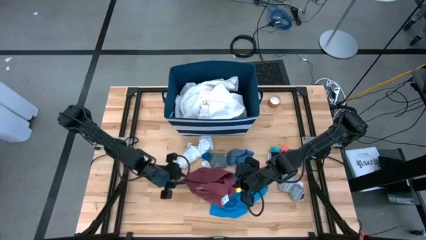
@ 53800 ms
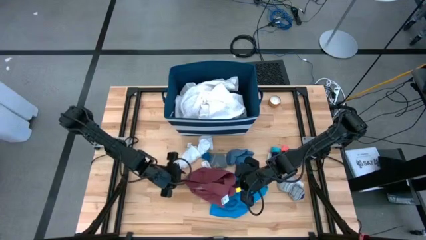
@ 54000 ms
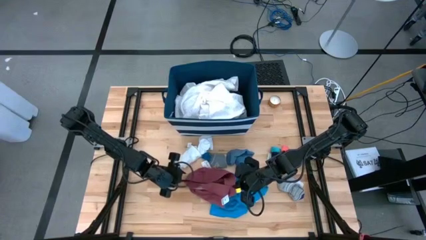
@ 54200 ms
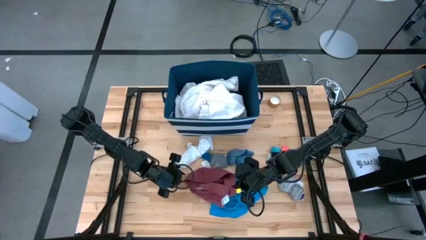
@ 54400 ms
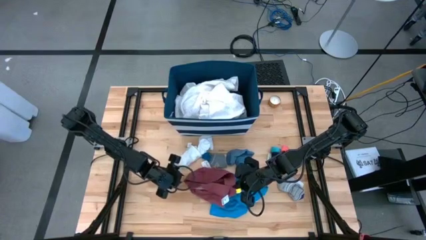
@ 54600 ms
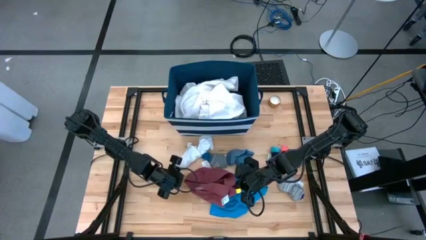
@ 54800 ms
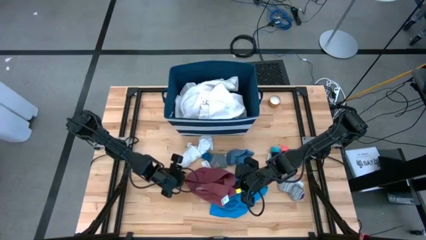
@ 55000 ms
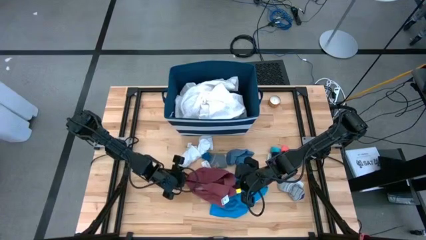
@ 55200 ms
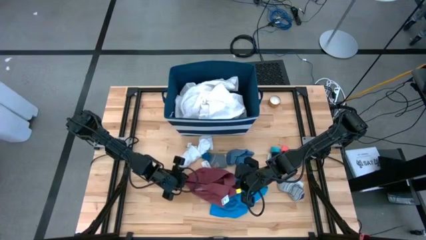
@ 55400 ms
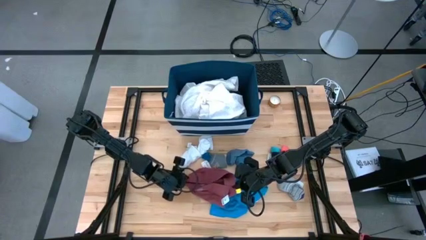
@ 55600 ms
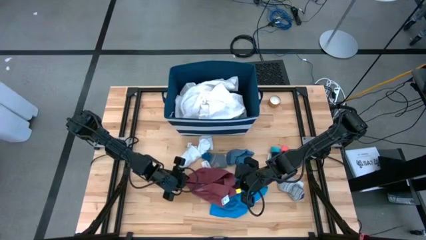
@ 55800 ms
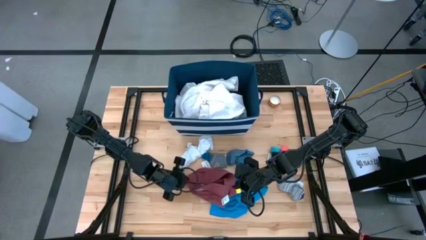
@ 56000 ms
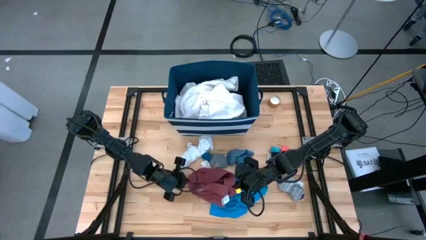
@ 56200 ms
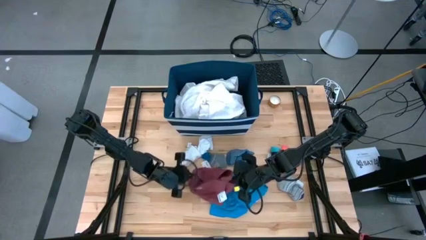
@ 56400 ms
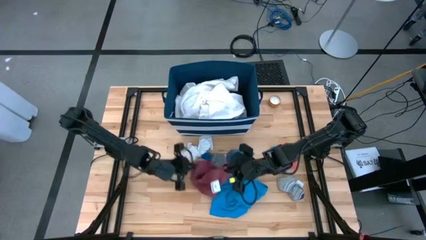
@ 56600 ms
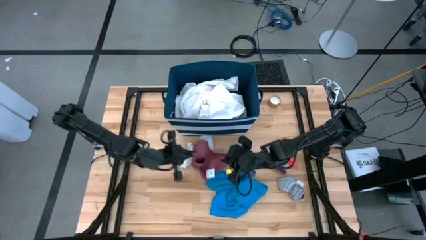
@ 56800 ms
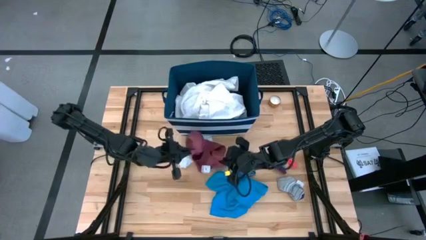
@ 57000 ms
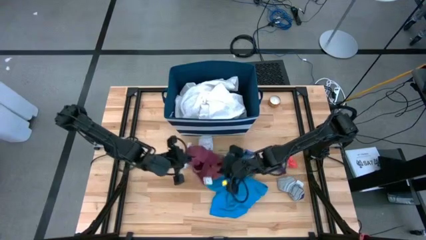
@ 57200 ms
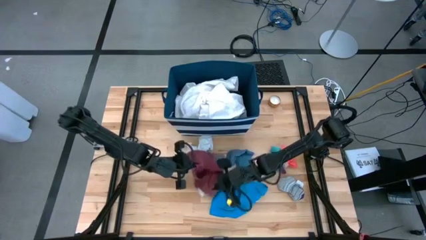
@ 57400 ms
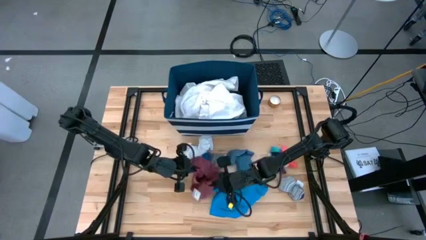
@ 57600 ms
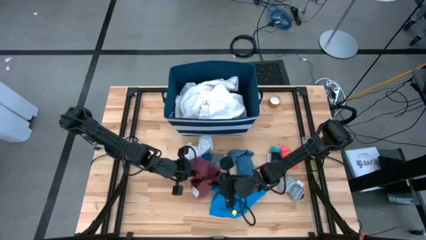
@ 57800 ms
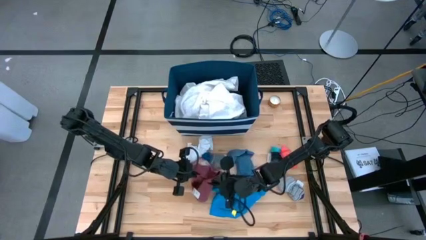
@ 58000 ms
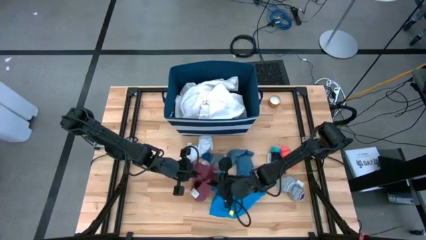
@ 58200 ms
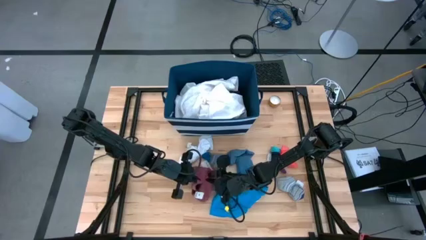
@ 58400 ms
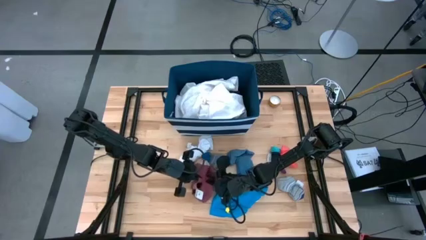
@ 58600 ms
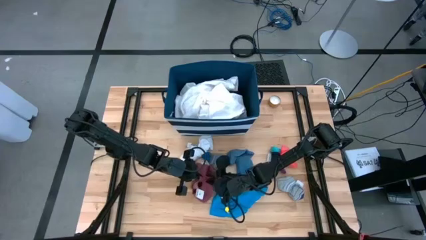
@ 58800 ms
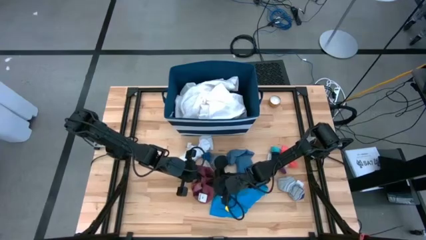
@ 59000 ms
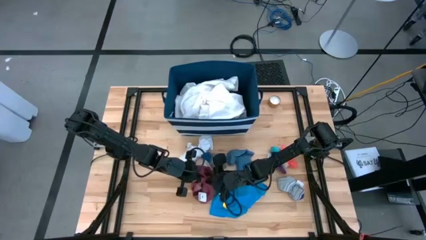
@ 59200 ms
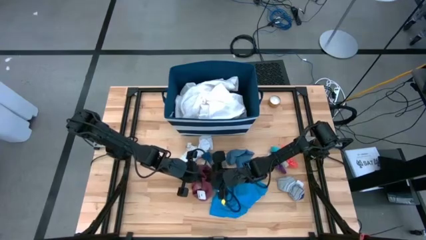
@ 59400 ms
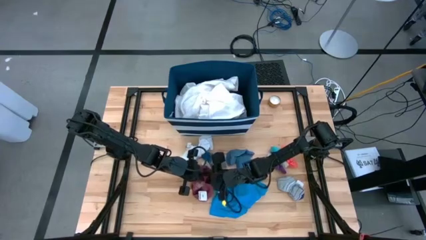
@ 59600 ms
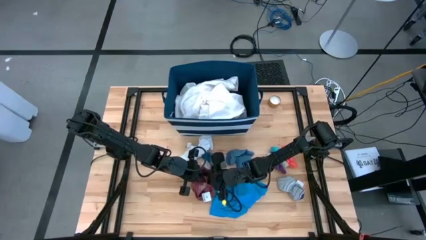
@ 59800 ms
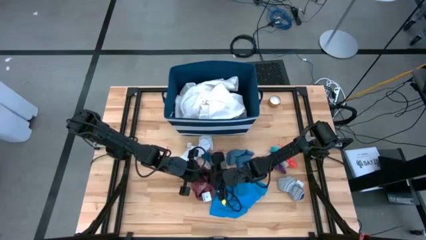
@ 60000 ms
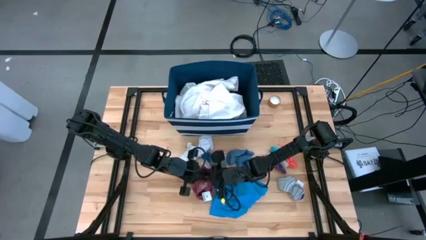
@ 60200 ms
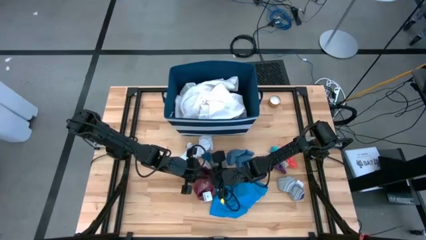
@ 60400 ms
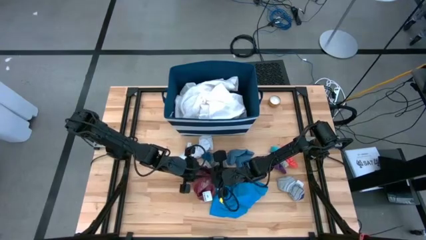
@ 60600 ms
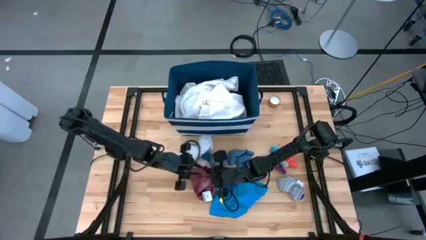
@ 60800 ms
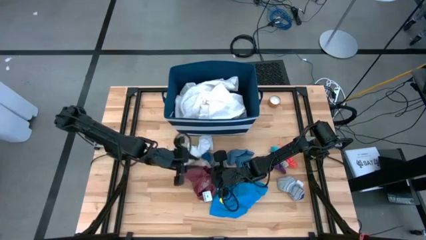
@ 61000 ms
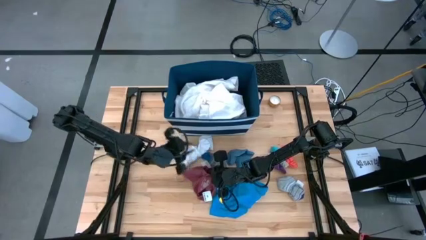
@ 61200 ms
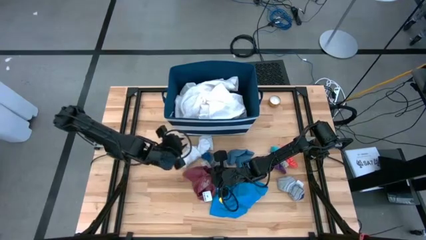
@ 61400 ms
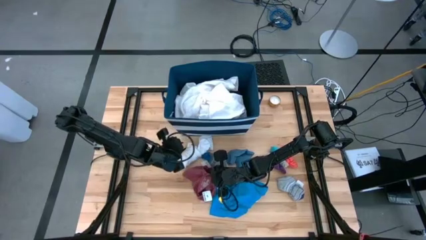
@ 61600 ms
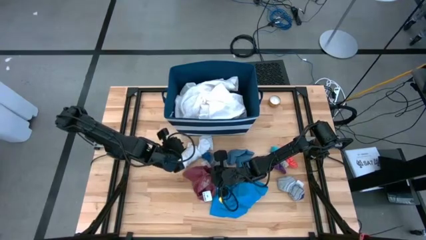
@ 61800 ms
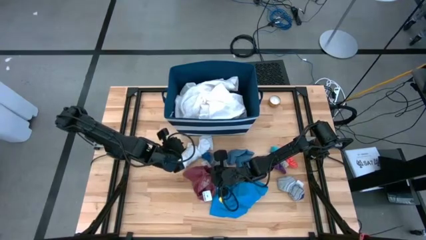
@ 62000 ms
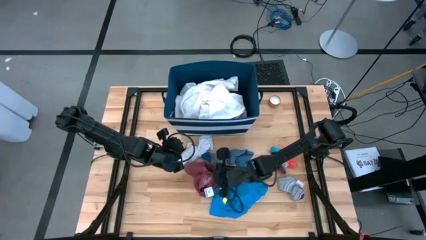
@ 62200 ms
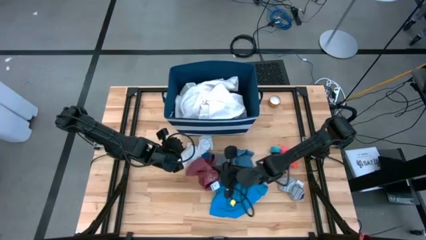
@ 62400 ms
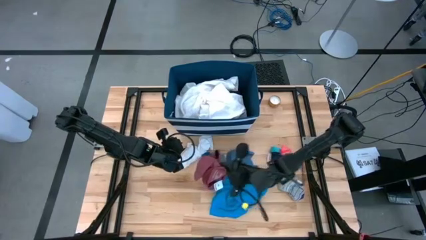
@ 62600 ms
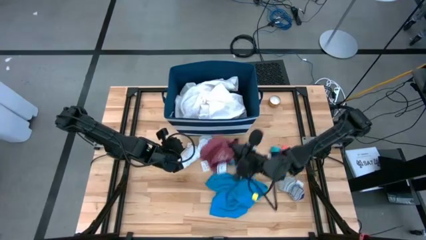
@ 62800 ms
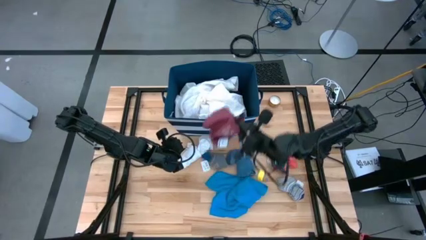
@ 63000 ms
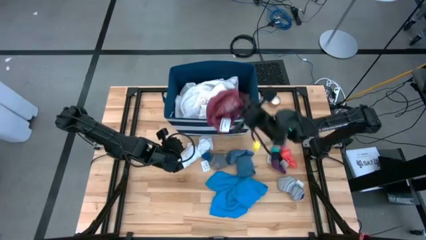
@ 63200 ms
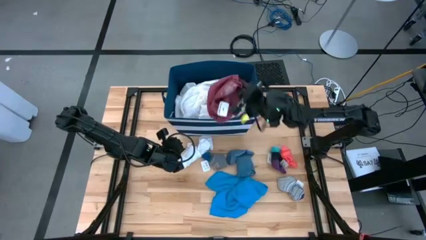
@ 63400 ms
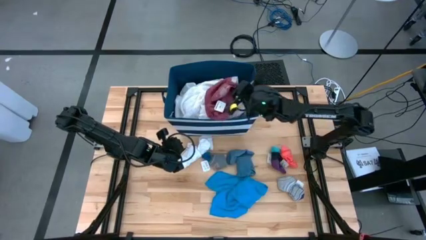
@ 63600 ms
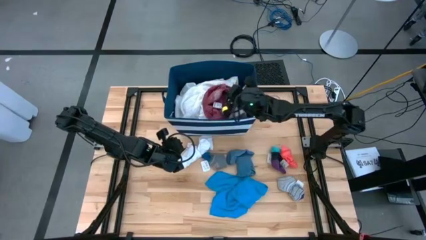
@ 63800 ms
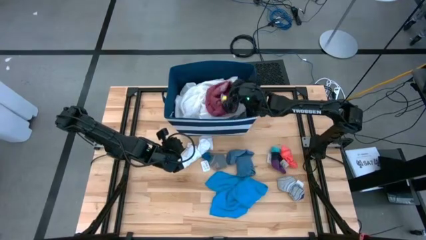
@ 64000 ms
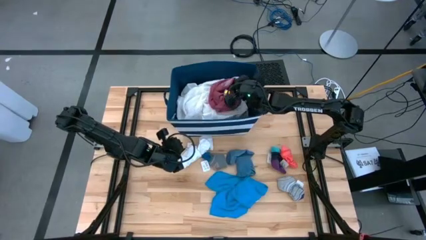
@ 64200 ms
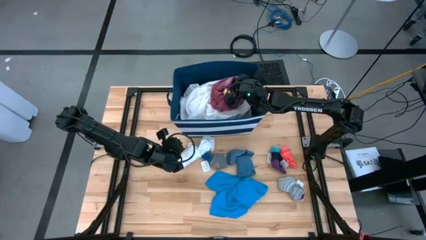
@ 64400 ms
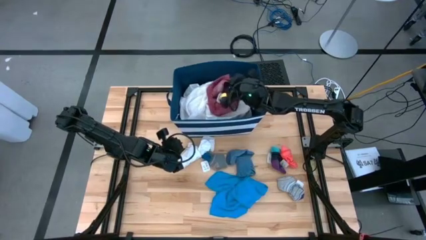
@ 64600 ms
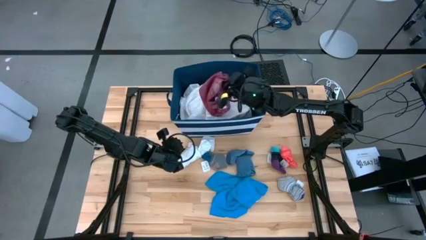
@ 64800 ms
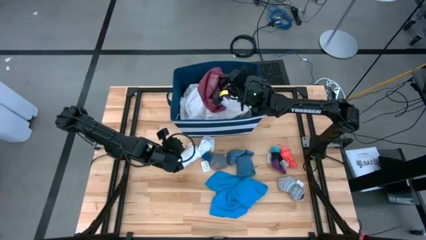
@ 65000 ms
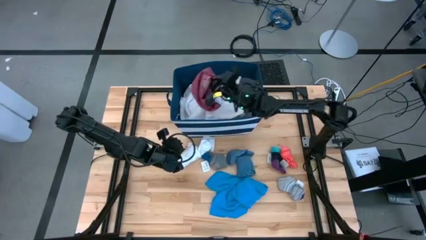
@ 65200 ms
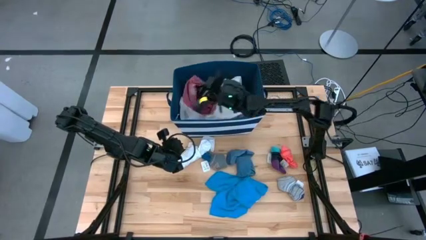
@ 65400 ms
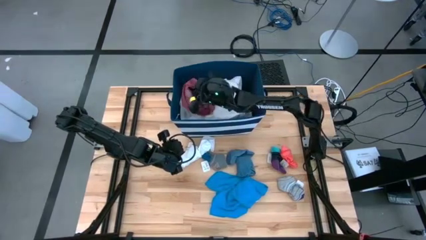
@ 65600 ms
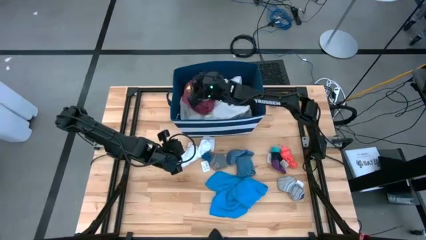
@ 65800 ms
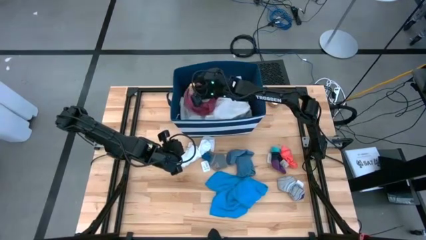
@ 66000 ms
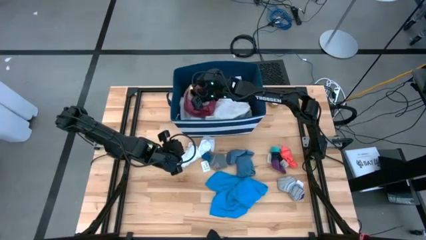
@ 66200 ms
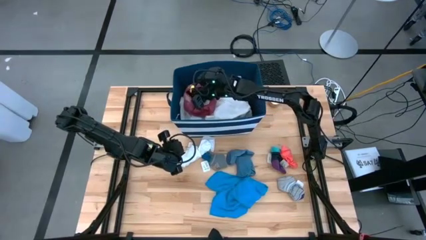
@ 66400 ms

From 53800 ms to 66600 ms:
Task: Sort clothes
Put the maroon underwear into the blue bin
